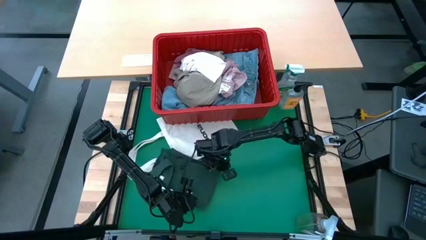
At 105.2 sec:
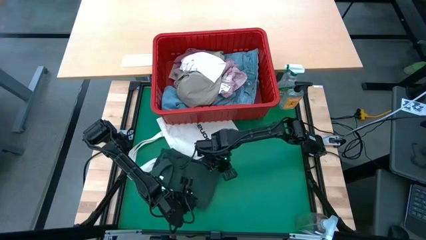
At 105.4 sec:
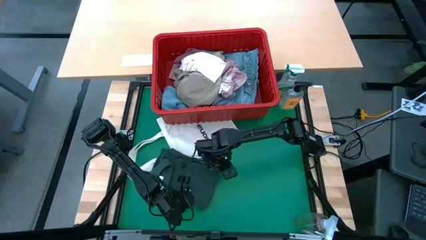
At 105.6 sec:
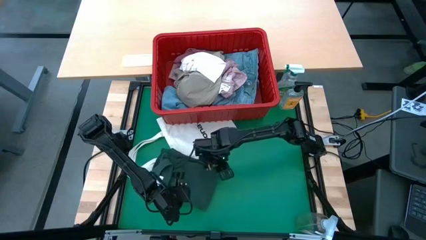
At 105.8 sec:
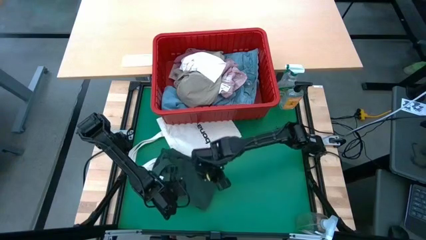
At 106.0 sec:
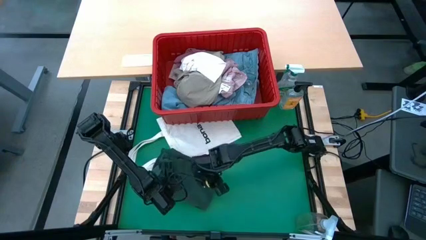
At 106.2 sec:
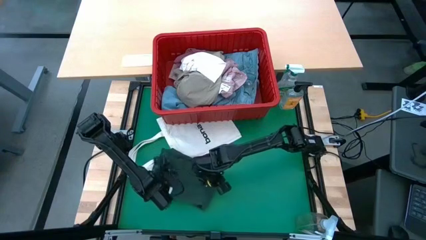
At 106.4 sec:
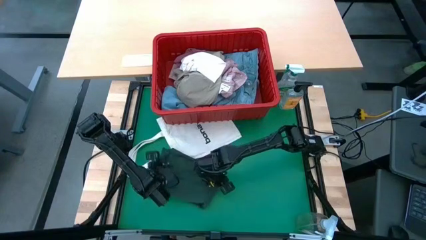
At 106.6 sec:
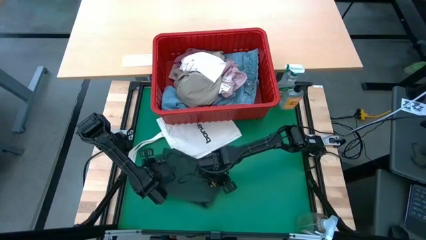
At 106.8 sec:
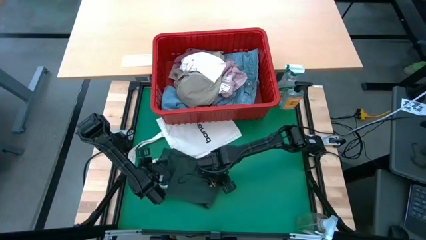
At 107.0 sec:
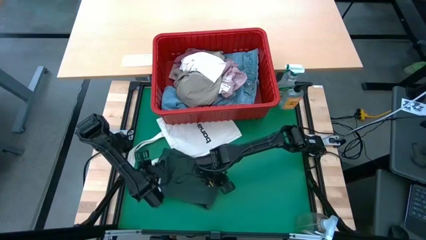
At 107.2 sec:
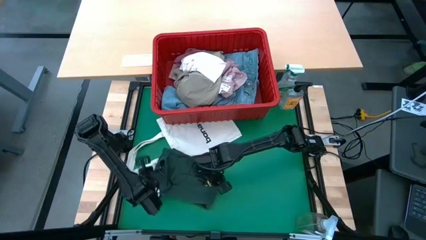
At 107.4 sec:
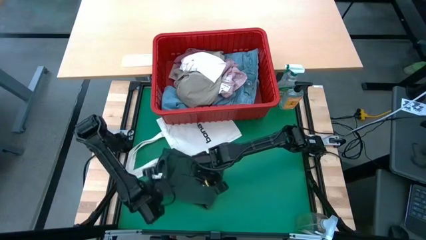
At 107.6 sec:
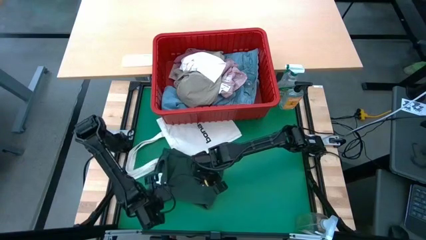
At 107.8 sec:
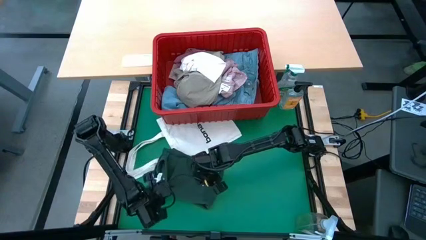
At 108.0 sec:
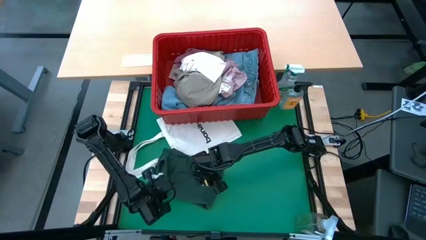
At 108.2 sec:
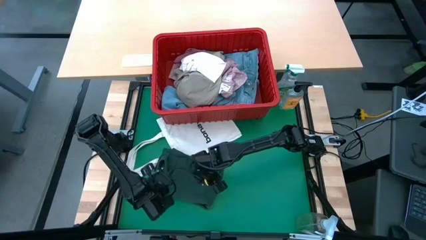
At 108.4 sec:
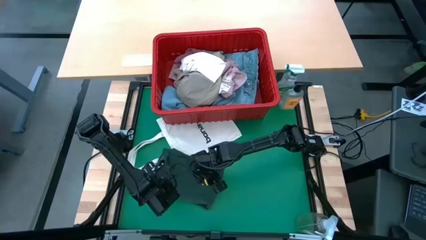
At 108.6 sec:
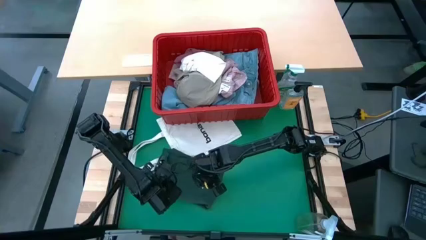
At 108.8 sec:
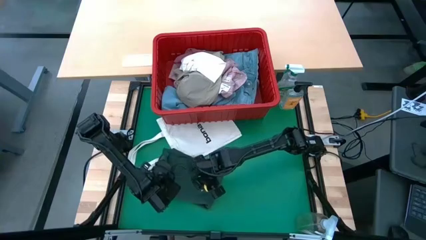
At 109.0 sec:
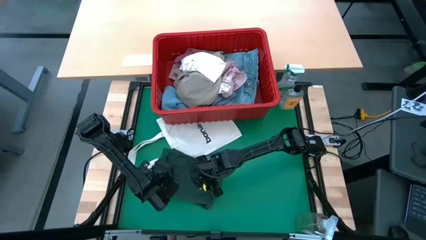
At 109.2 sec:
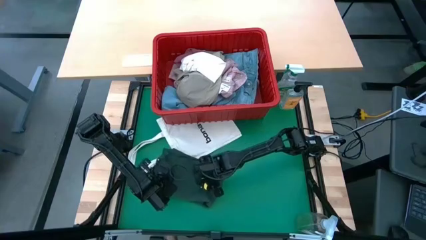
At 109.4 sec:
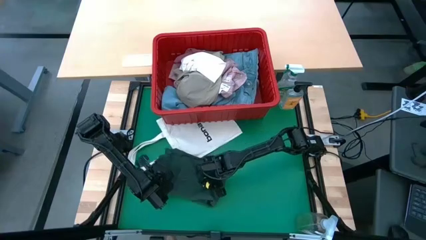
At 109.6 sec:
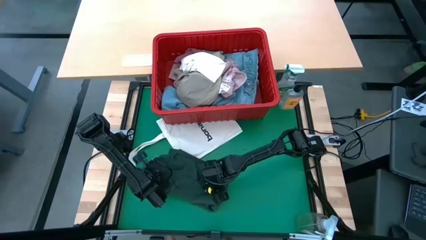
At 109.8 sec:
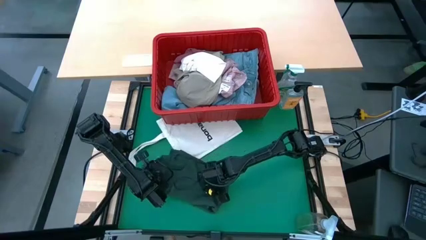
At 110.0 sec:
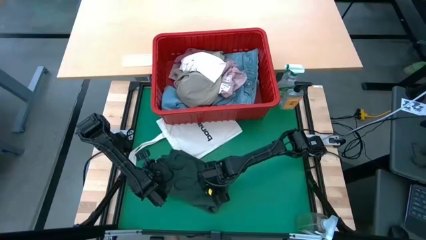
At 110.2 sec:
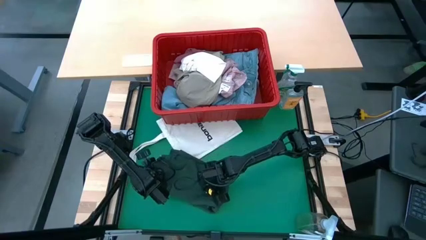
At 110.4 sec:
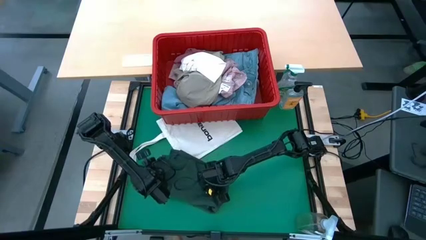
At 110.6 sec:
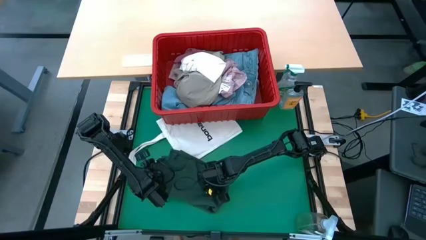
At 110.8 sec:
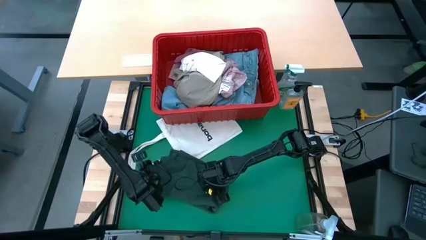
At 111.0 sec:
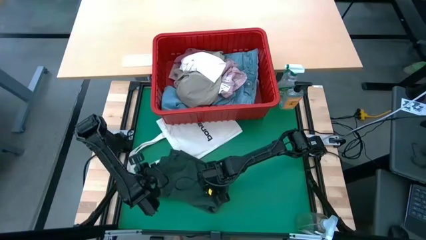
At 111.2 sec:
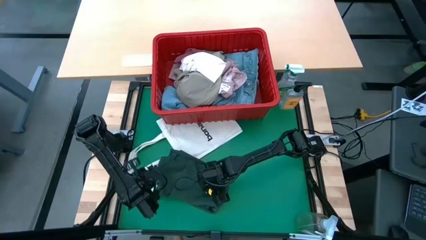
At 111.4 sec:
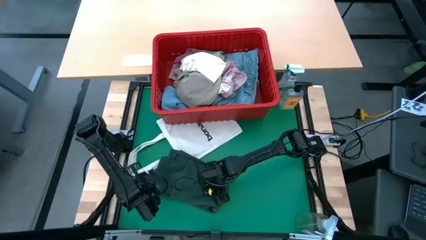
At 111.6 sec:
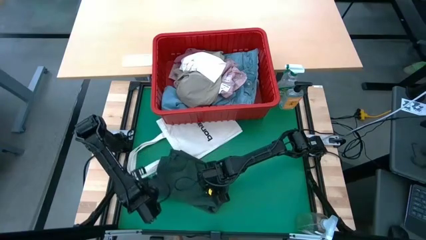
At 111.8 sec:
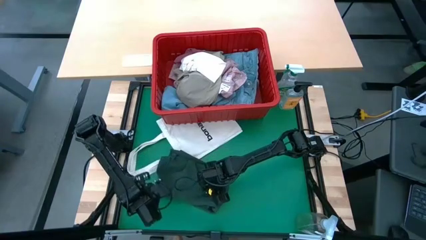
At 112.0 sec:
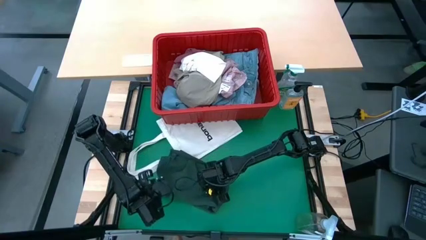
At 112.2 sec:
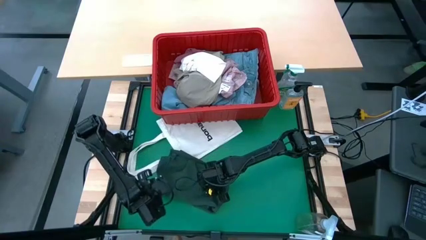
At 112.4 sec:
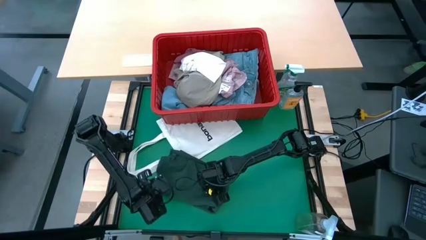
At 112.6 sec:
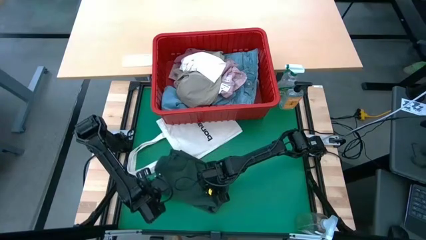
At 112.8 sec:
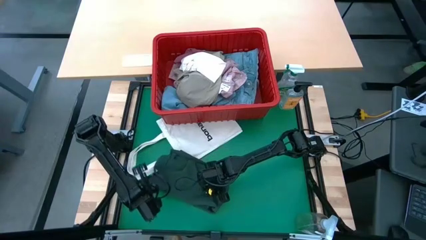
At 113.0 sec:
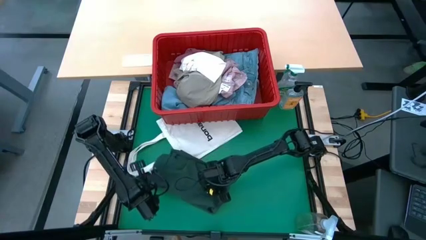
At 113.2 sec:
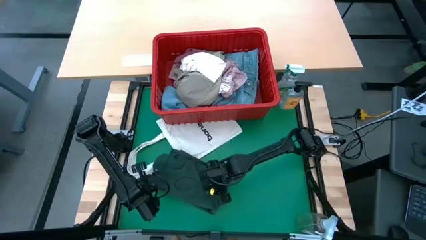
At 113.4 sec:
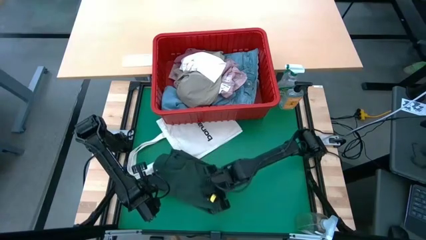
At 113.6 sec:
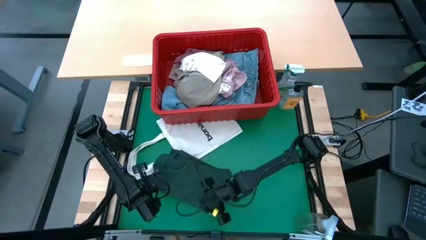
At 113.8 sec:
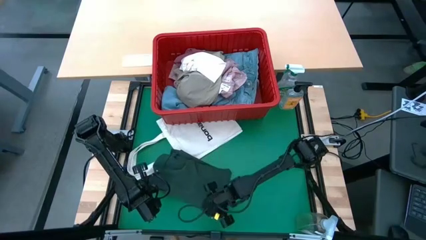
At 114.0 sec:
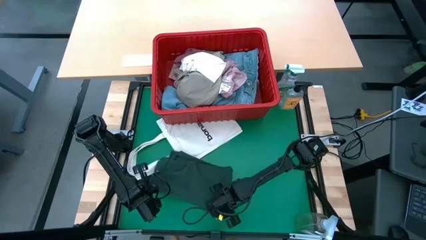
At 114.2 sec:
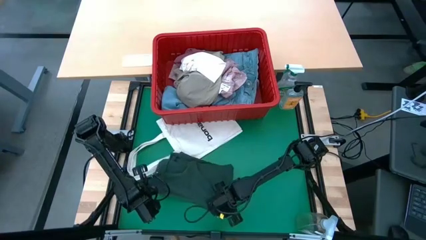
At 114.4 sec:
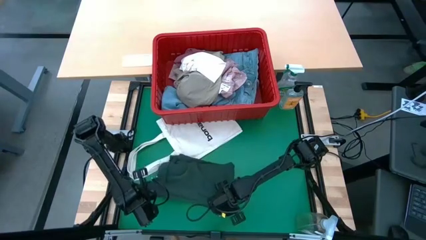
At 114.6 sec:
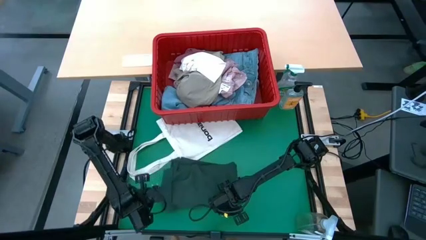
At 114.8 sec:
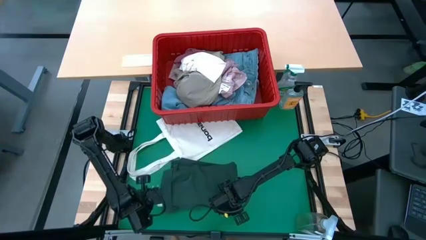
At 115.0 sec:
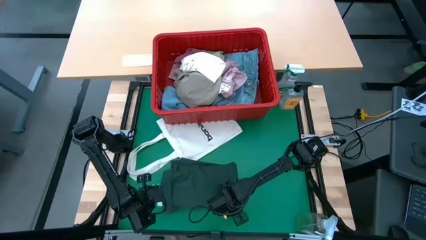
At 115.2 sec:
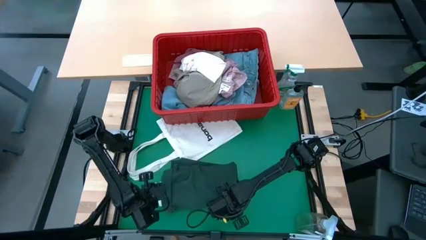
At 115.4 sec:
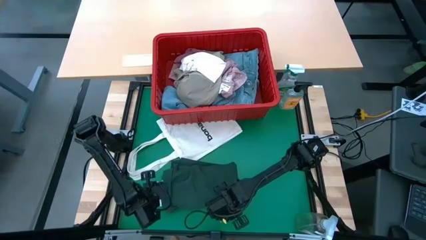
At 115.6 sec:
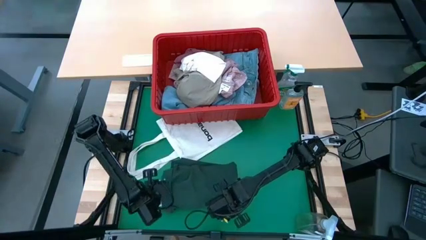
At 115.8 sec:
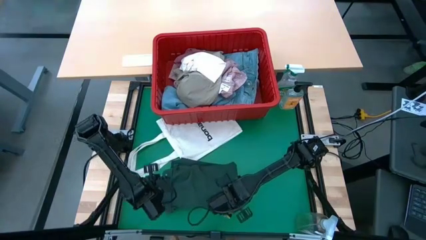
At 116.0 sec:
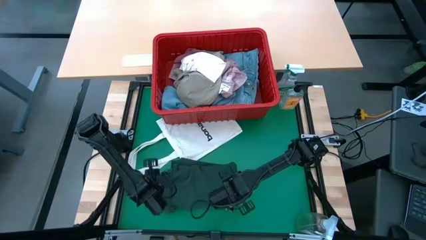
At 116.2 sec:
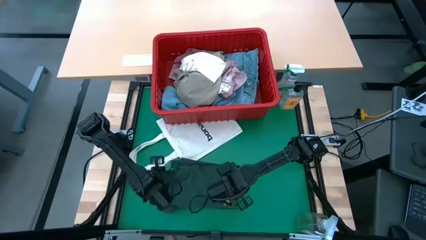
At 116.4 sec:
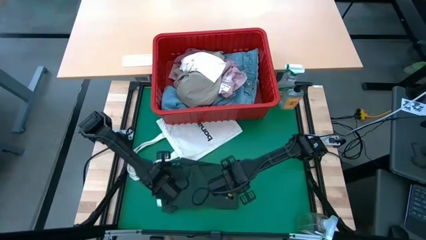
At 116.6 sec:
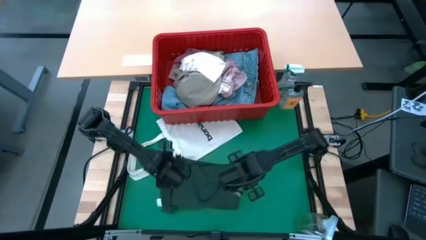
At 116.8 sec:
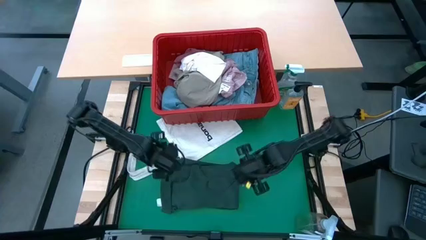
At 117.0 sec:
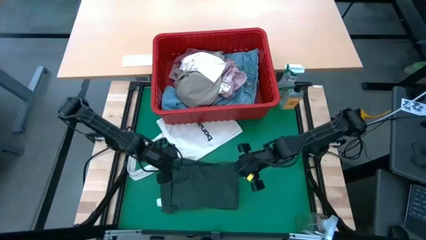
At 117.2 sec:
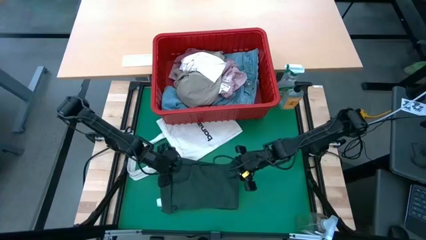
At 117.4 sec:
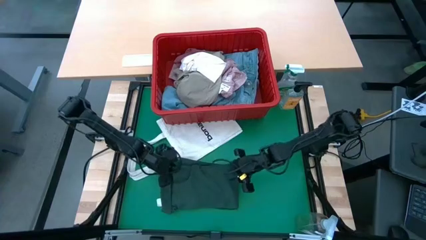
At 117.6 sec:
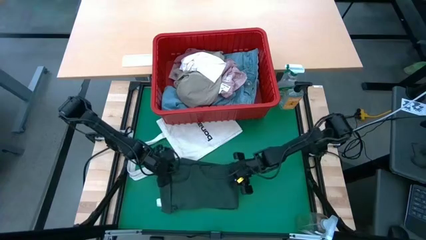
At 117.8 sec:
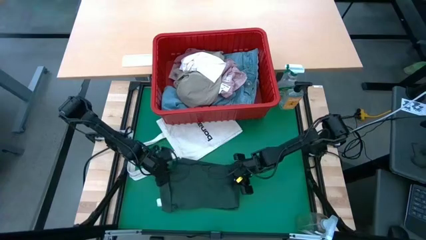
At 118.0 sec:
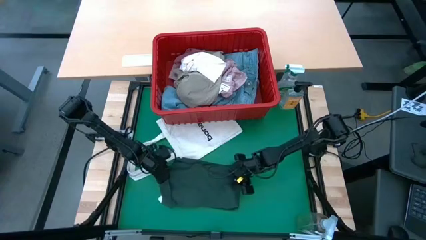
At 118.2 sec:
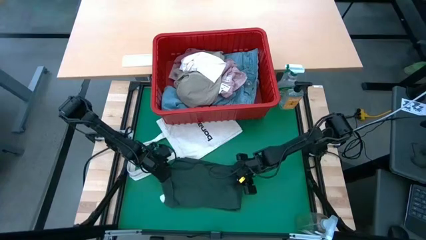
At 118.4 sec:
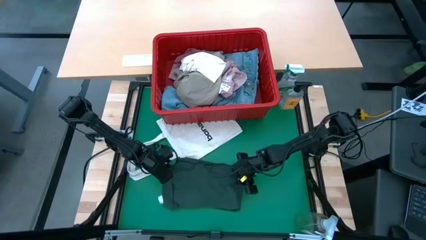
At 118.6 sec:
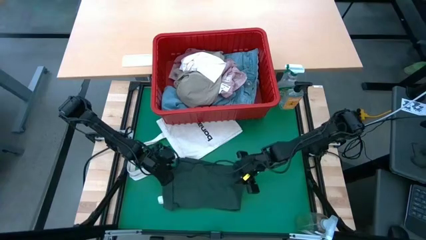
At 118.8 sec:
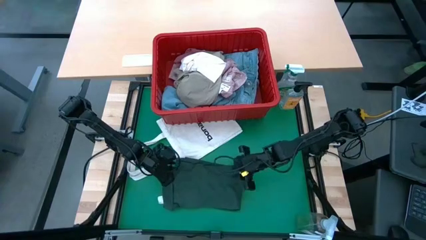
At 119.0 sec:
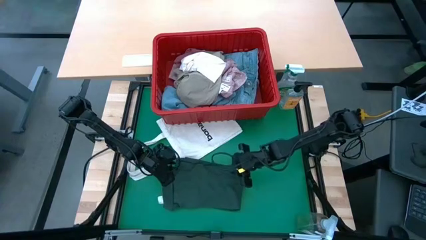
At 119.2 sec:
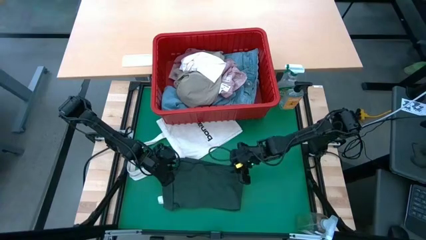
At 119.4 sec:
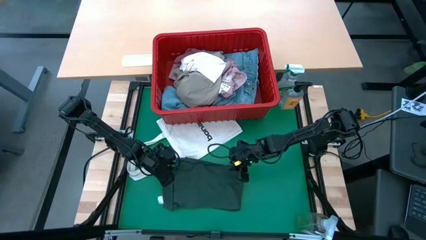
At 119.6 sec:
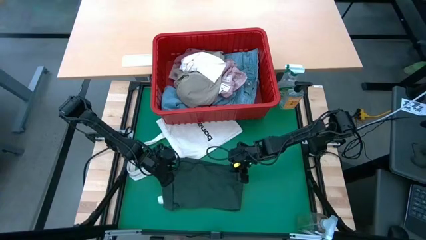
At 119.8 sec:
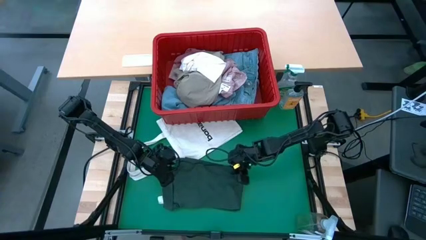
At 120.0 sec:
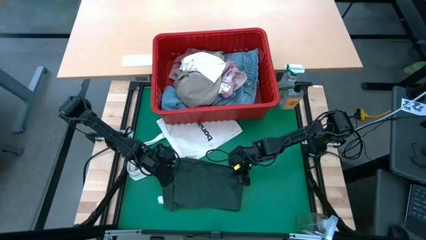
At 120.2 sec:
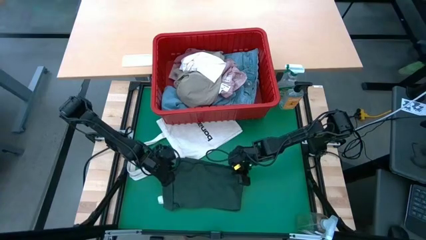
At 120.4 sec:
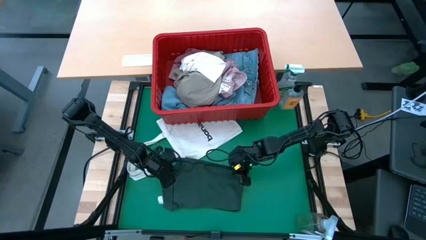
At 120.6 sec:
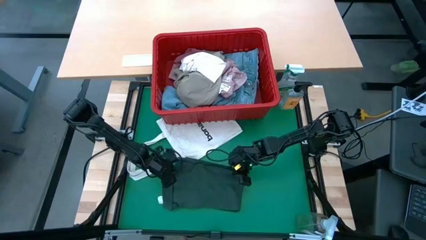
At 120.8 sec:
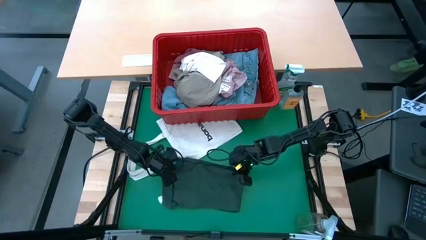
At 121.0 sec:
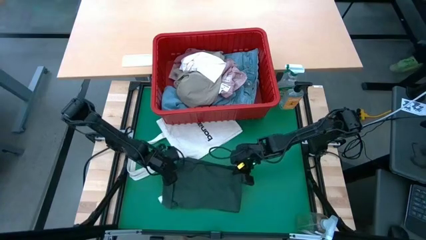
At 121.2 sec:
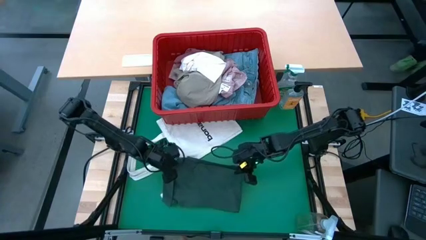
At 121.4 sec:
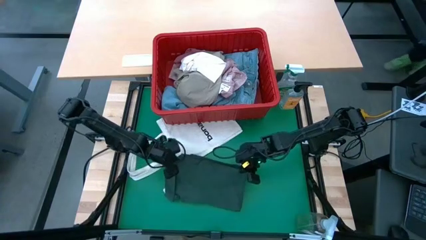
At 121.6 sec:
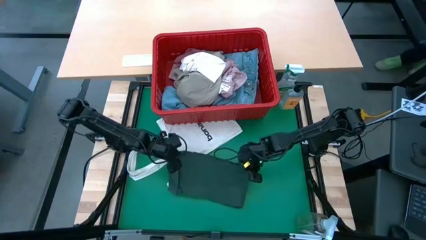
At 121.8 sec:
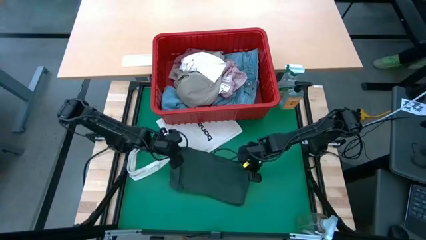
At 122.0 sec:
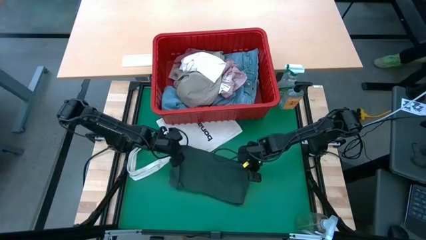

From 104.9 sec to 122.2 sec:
Task: Fold laundry
Fold the green shirt
